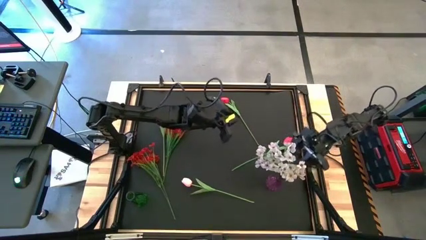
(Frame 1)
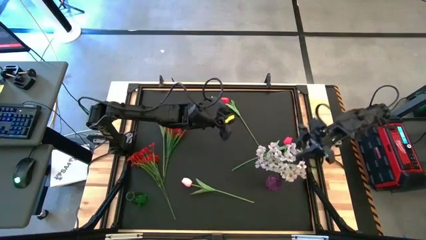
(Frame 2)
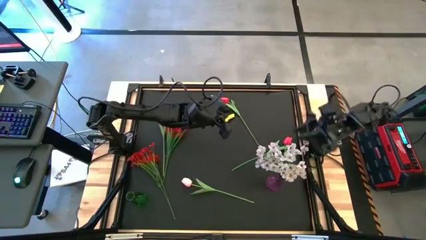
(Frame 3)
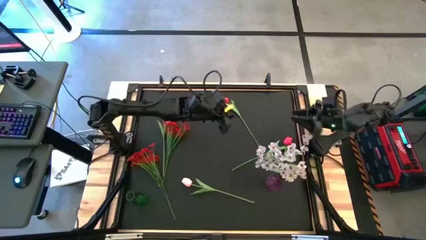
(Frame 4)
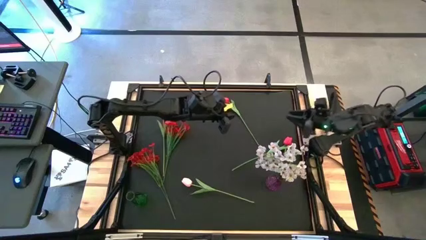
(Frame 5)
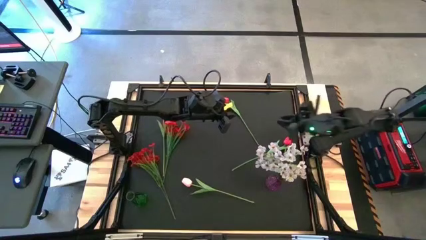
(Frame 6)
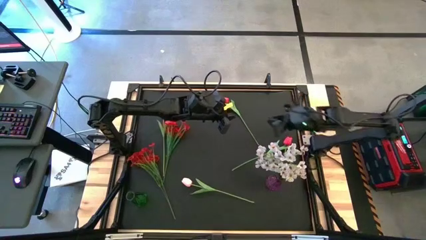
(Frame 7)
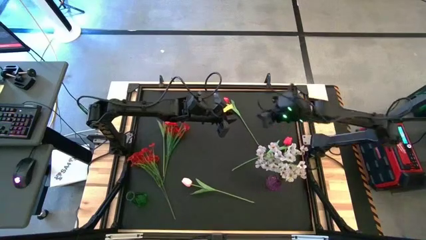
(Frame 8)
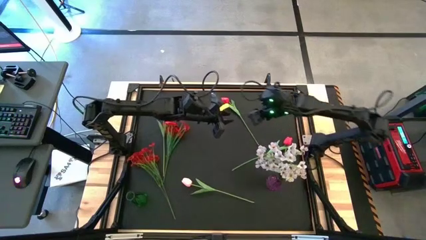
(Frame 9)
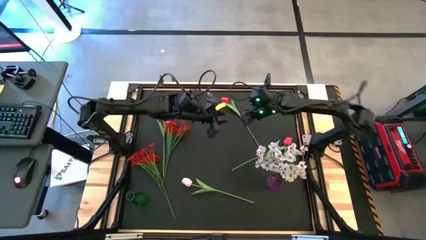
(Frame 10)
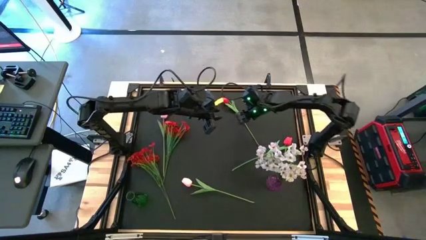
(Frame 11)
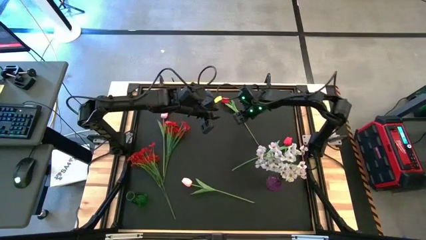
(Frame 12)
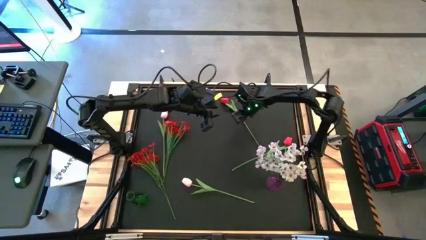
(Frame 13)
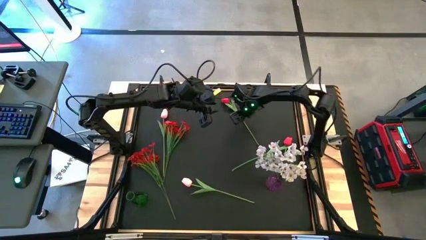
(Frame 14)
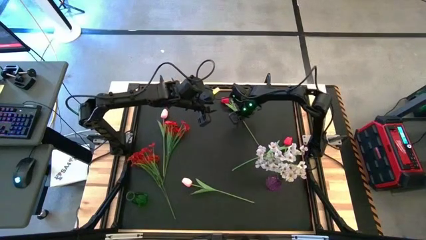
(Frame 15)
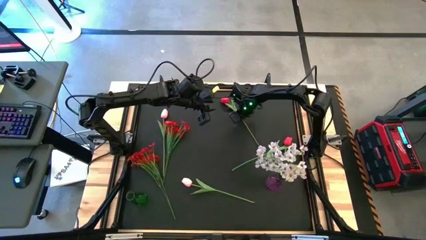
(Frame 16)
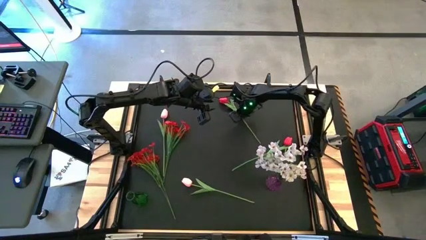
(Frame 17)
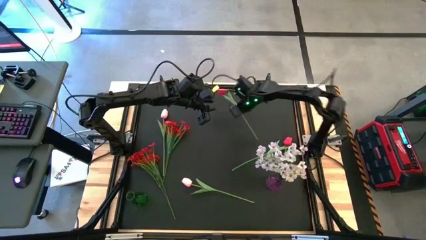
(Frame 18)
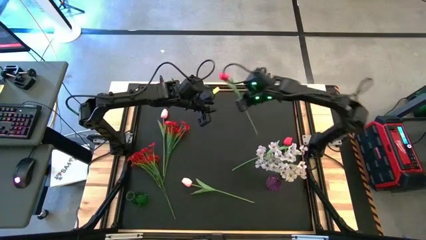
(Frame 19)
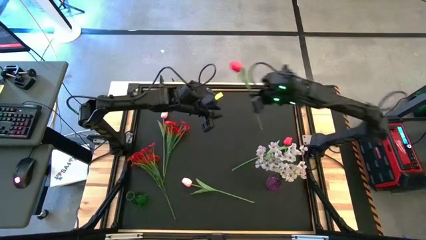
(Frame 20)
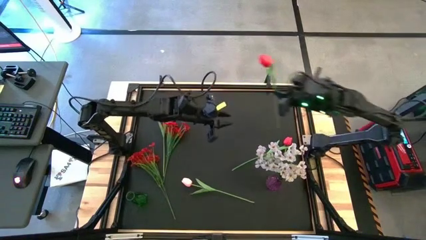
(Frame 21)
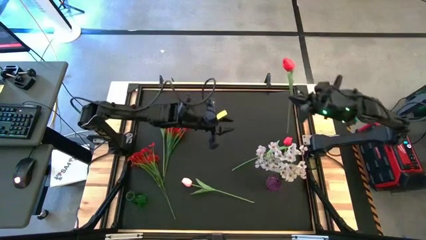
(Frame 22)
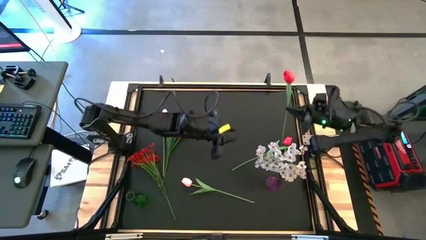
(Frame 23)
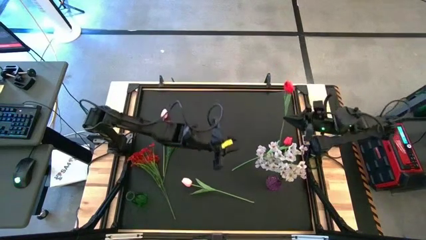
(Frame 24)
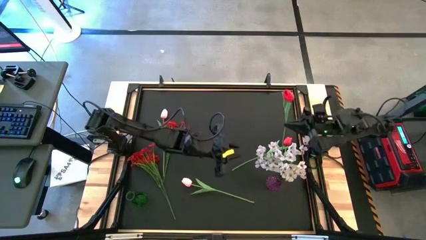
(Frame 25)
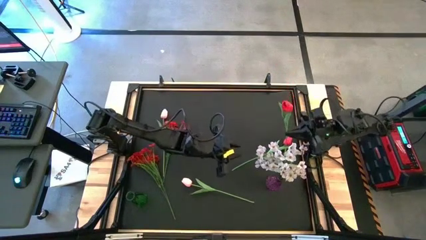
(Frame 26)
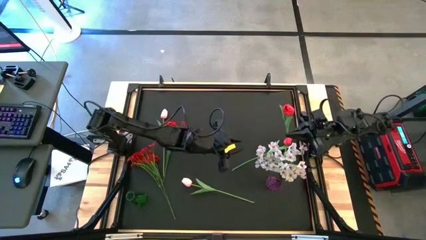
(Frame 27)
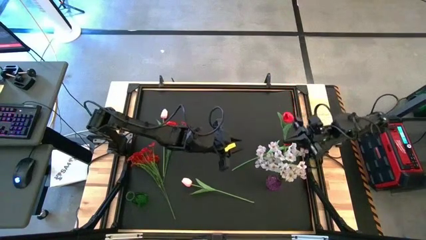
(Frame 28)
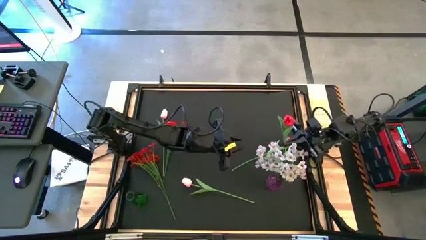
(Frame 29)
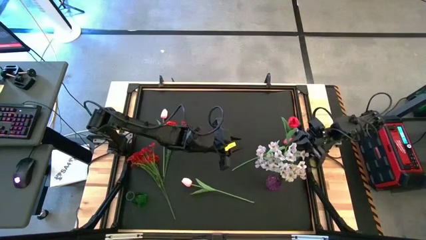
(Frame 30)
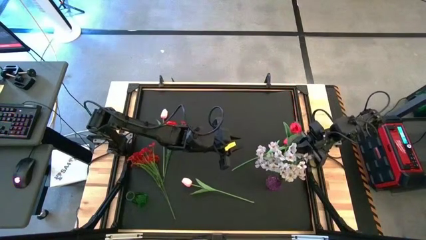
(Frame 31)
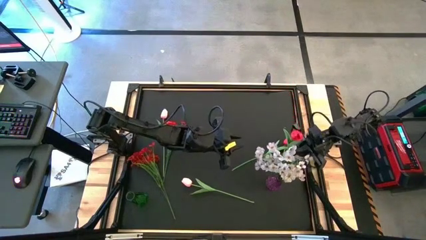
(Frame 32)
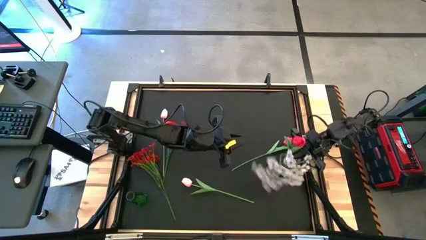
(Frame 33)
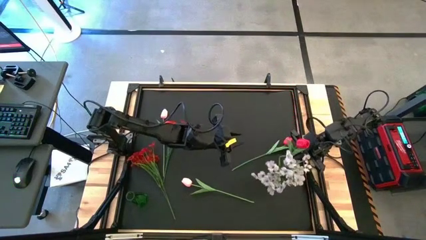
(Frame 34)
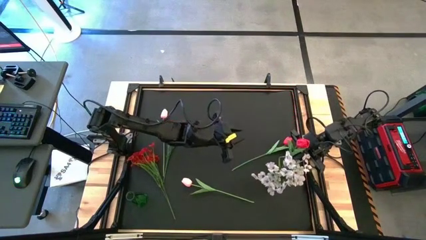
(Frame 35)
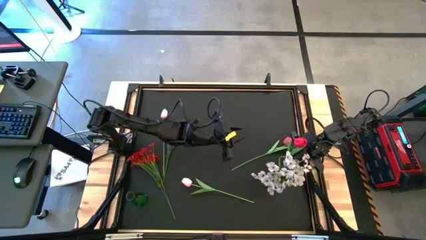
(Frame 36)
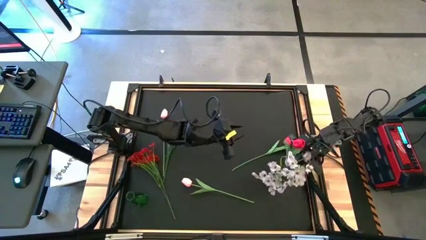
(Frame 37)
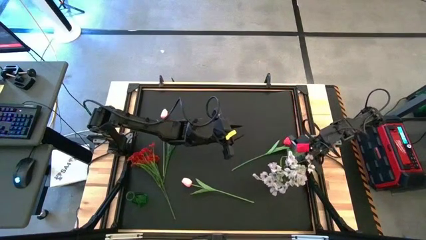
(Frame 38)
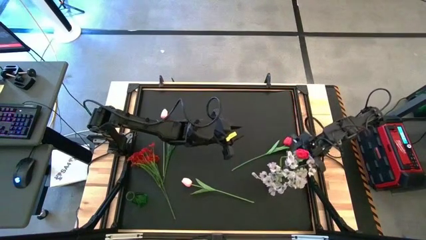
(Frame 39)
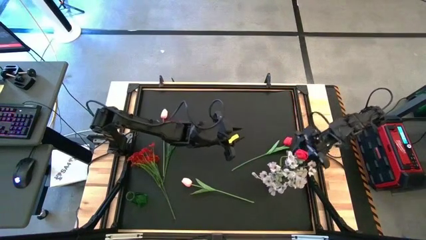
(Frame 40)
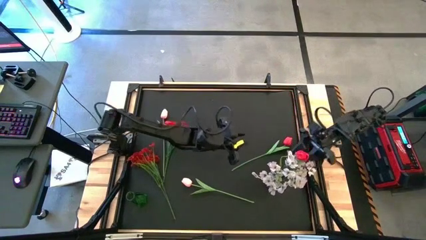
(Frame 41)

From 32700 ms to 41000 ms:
Task: Sort flowers into vase by color
Put the top red flower into the pink vase

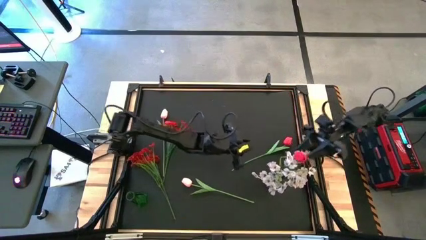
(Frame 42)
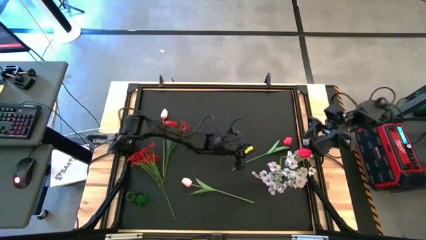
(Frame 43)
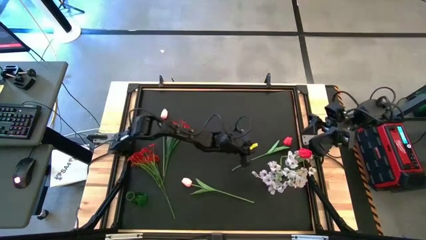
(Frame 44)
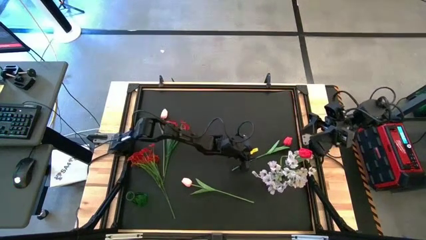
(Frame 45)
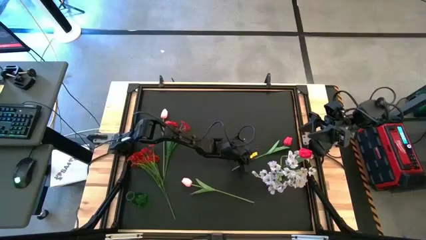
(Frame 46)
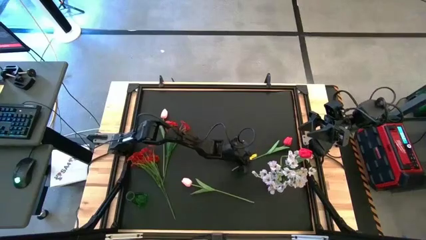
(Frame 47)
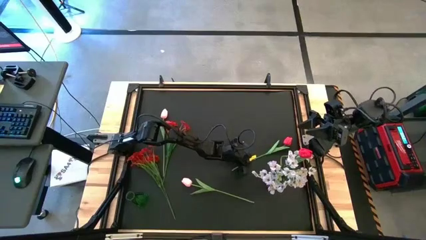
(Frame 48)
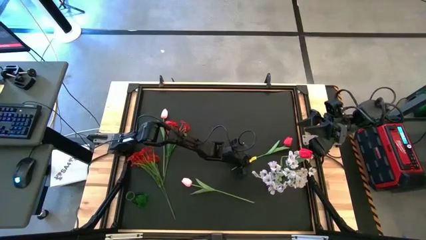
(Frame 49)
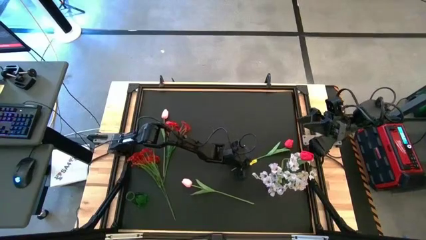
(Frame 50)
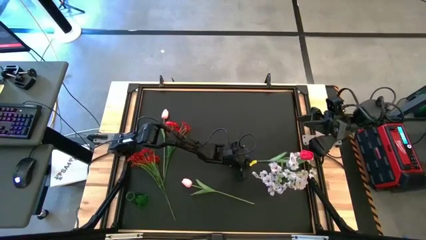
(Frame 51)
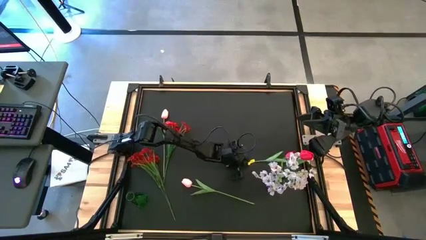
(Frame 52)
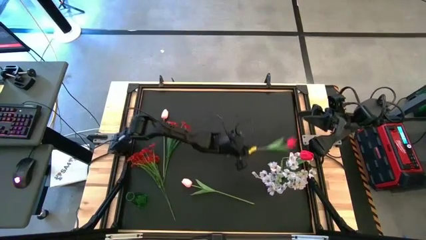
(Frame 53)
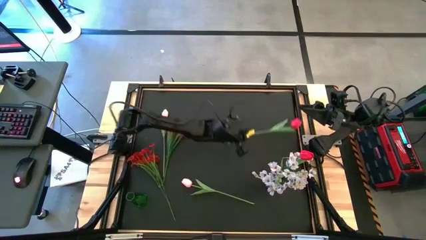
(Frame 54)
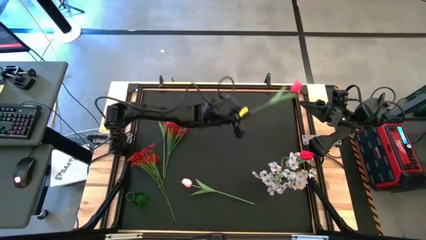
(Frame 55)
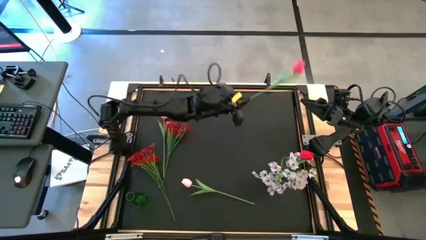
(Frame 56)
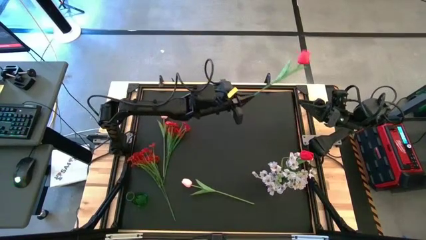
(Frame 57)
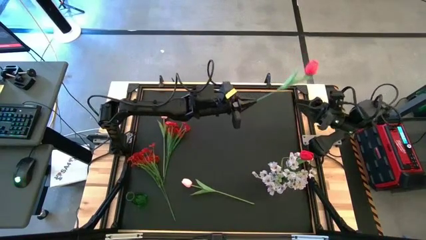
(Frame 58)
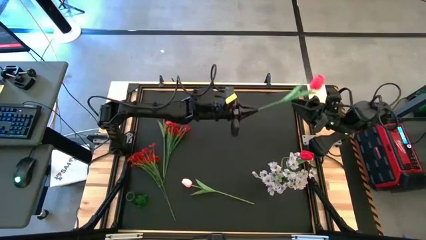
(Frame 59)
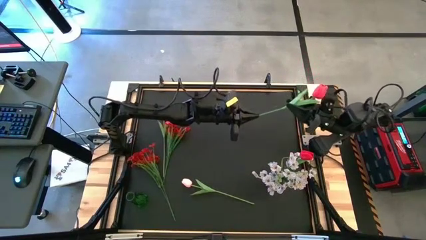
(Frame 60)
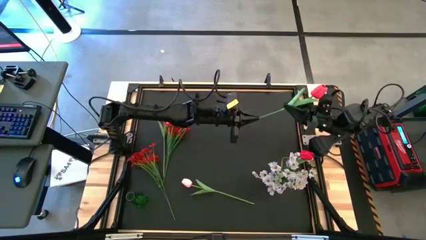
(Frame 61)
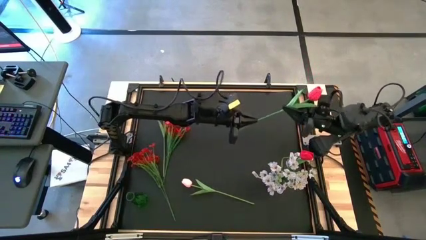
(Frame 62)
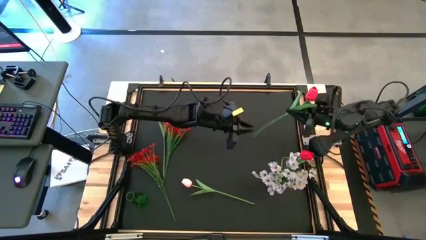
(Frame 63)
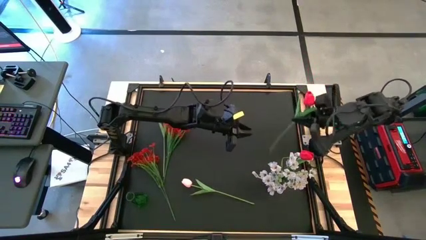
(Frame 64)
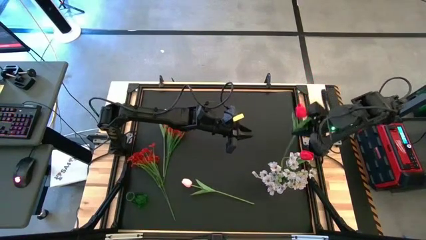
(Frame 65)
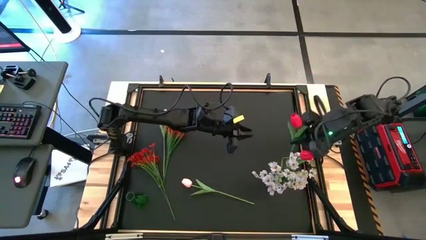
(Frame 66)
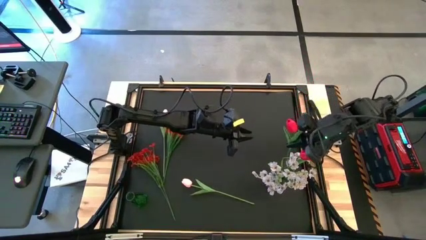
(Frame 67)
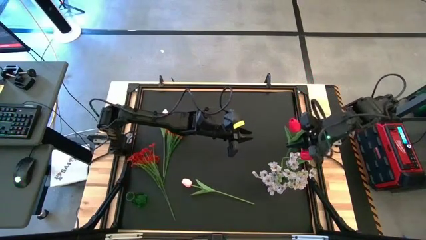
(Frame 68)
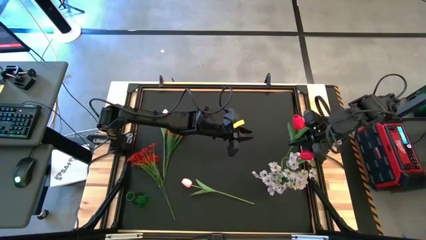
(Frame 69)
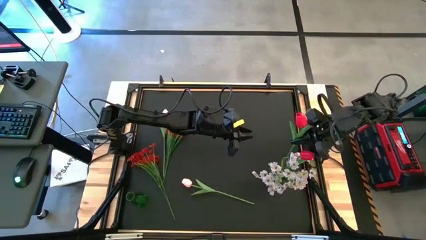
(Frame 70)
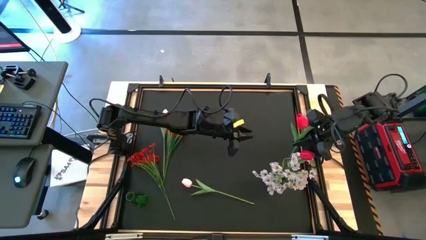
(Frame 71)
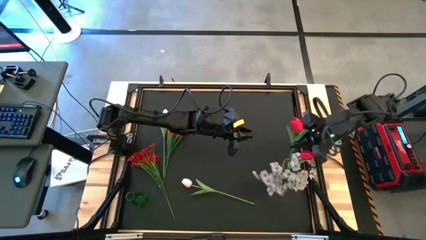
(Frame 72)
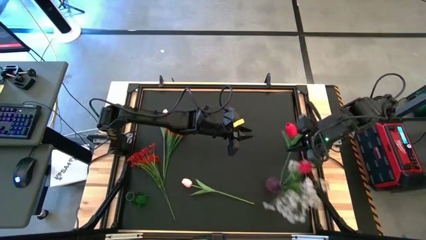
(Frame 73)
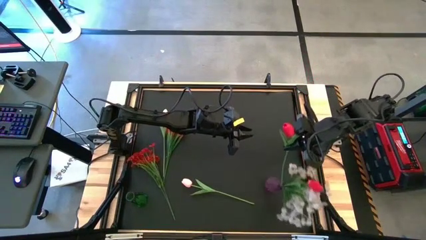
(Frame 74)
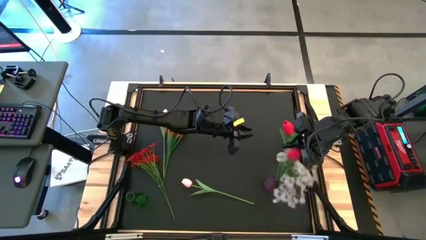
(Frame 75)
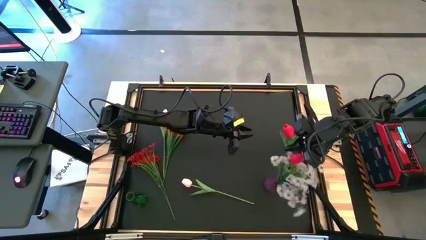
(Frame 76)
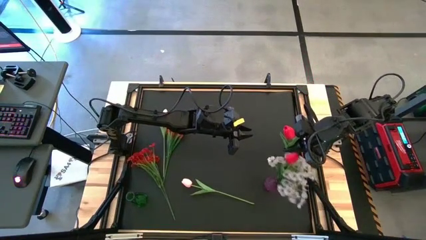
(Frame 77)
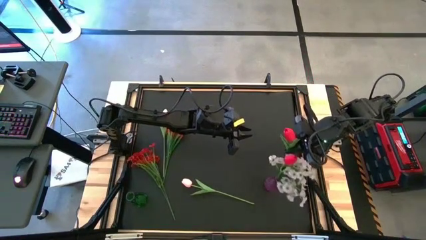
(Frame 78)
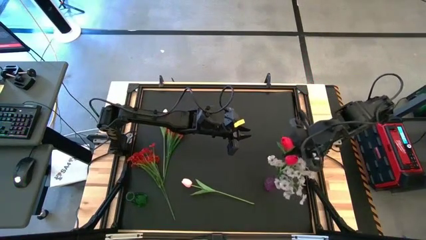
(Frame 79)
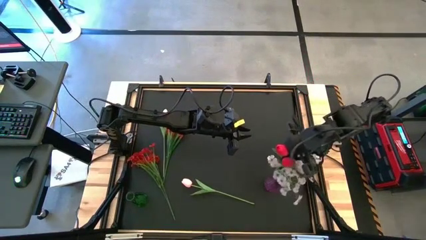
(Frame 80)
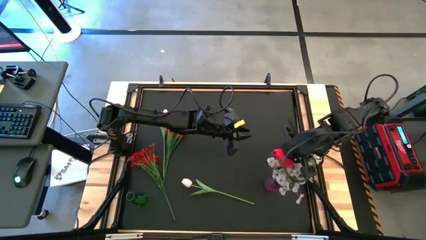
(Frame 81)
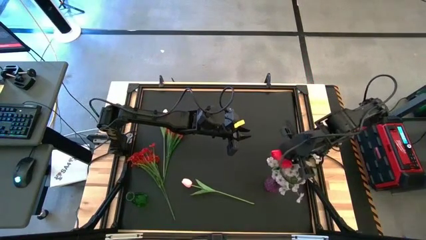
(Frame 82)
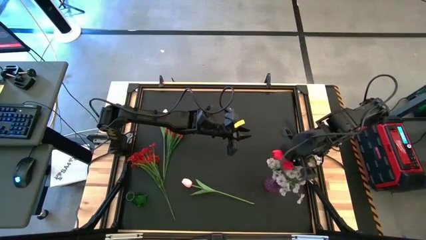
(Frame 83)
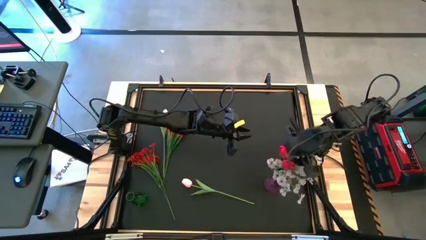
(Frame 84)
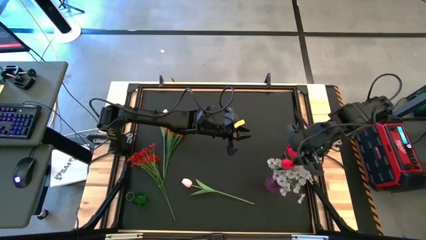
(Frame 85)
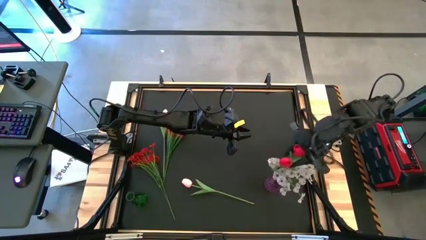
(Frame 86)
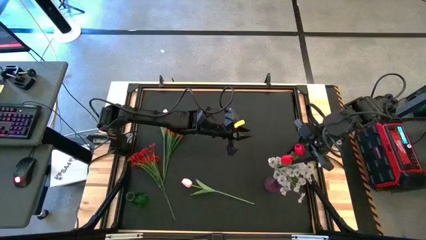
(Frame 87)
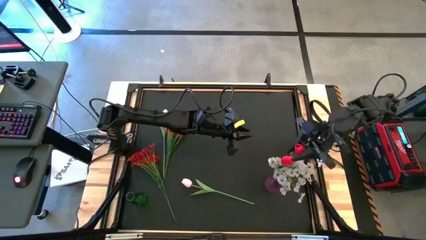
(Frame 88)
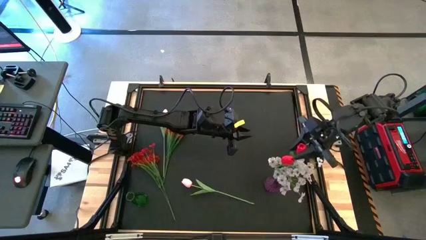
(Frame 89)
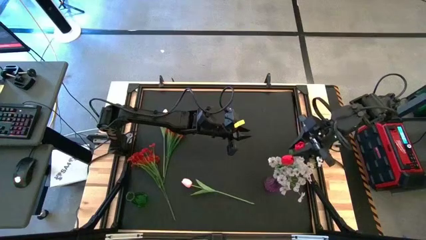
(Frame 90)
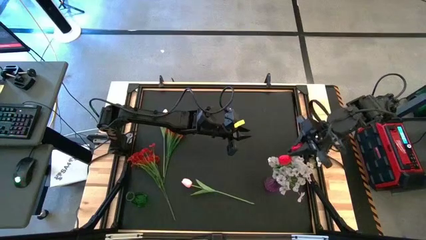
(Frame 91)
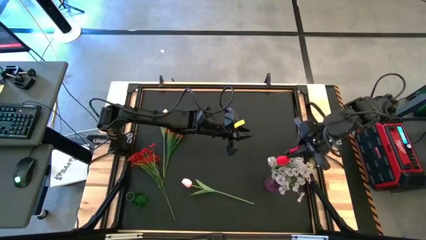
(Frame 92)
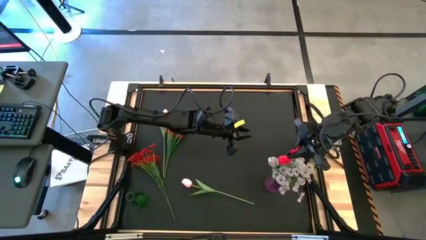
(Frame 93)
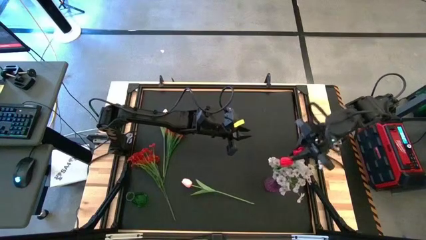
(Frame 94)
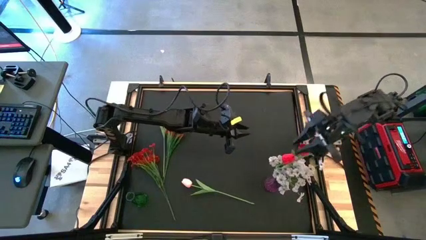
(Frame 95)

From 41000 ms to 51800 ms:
Put the red flower into the pink vase
